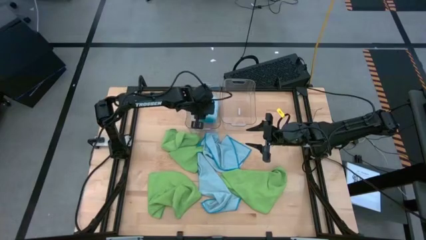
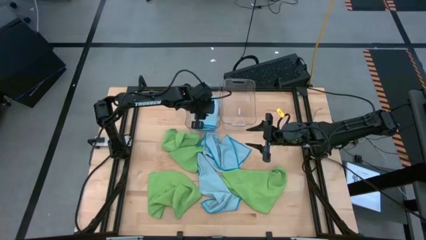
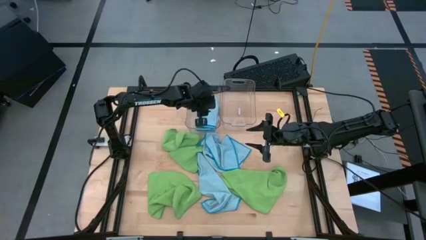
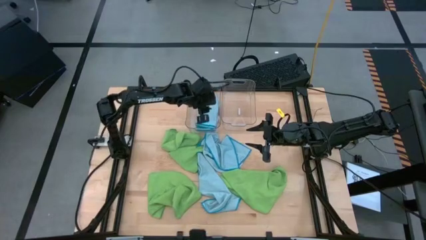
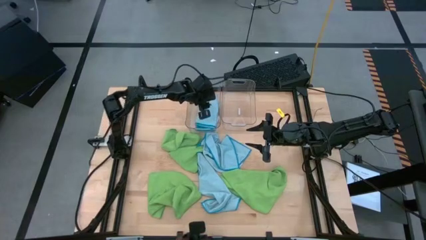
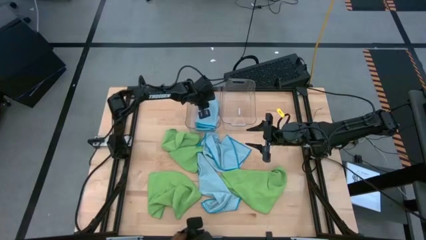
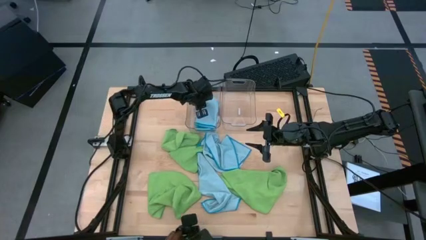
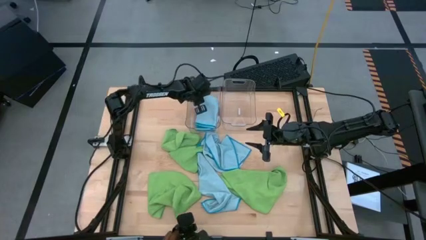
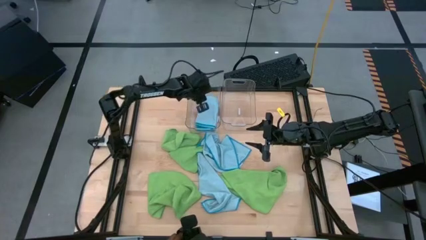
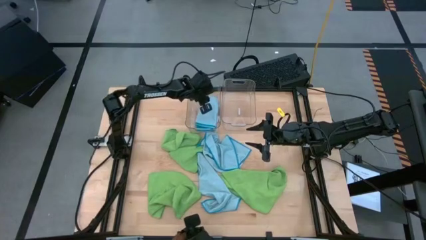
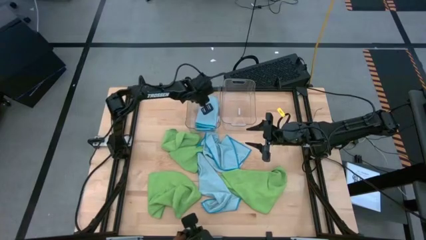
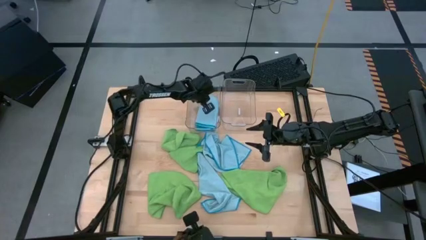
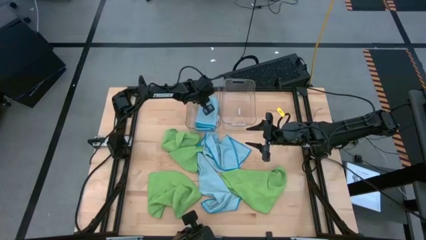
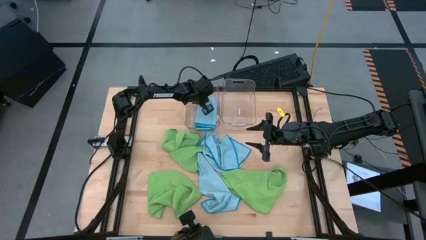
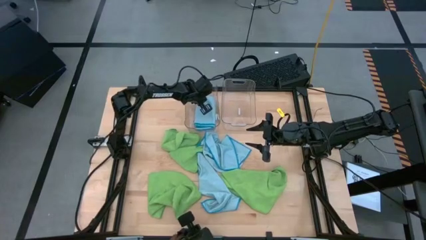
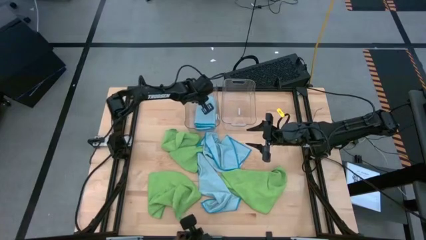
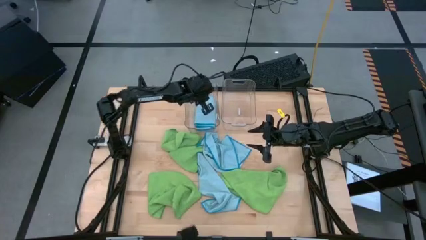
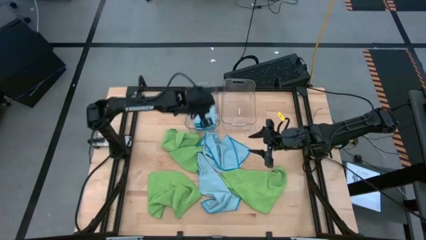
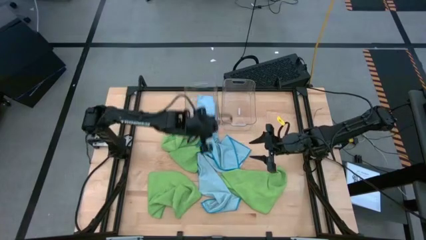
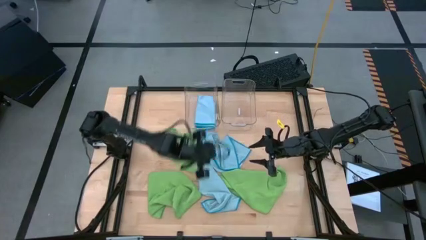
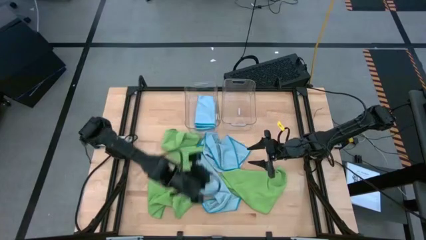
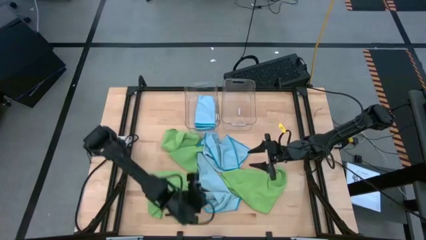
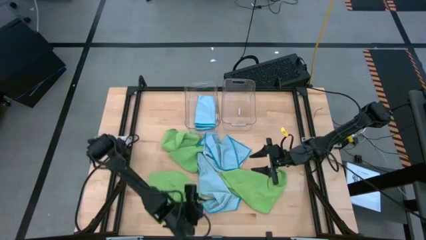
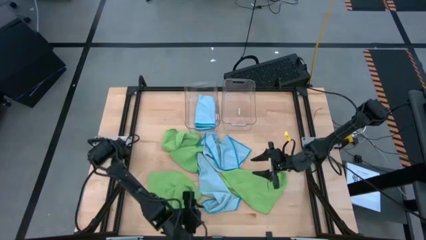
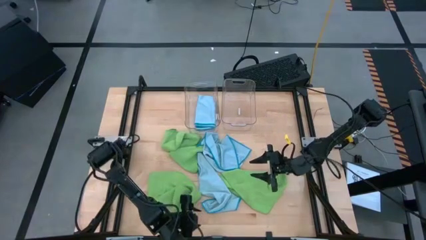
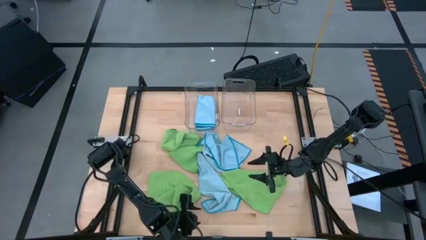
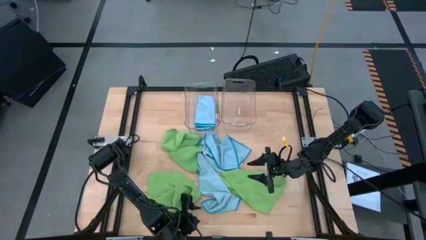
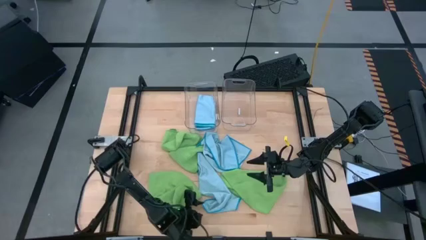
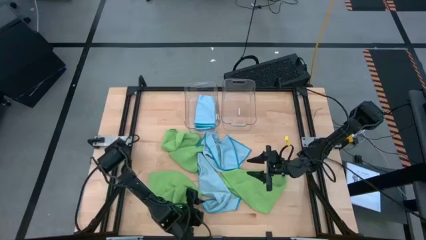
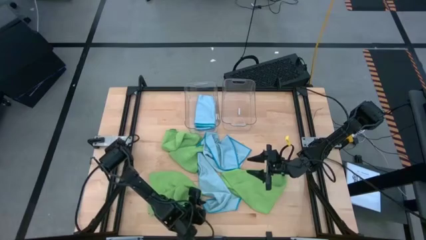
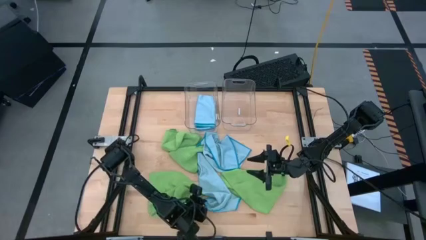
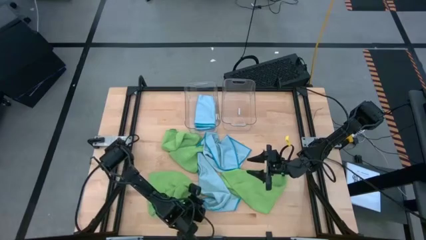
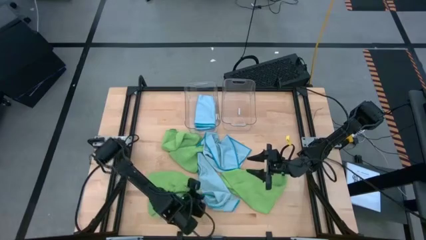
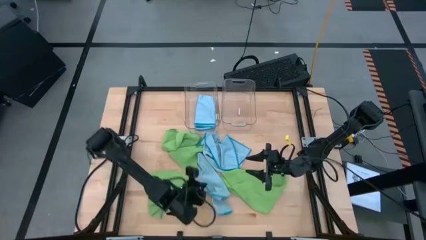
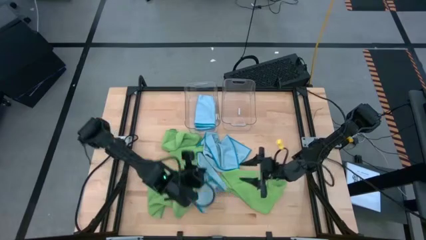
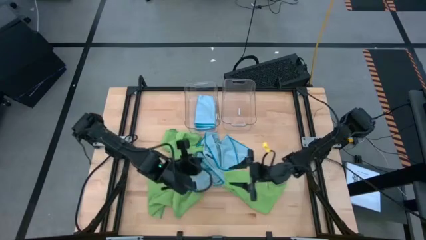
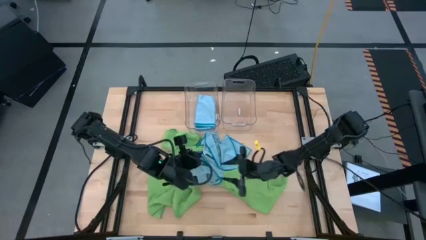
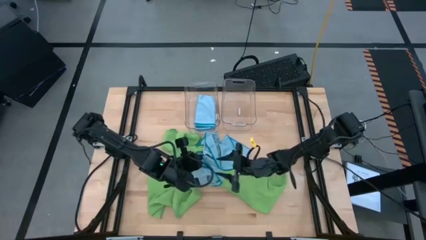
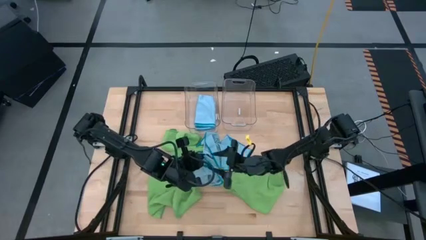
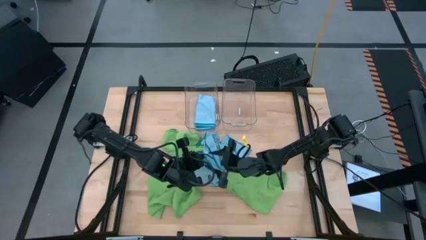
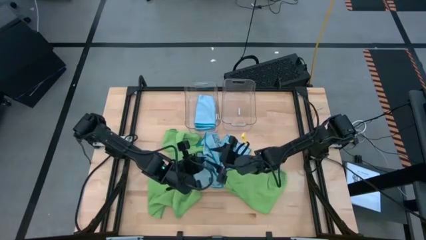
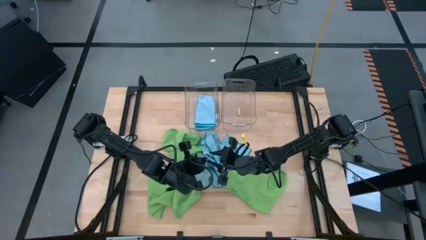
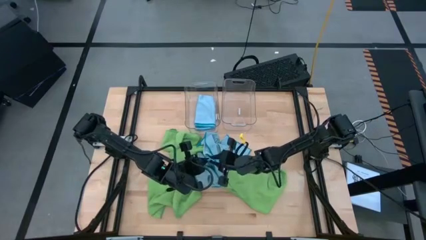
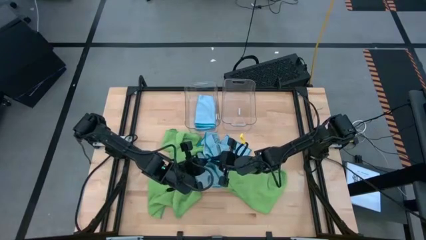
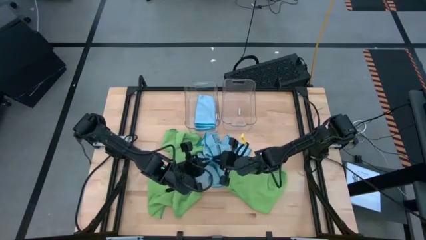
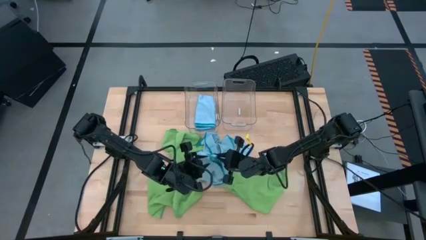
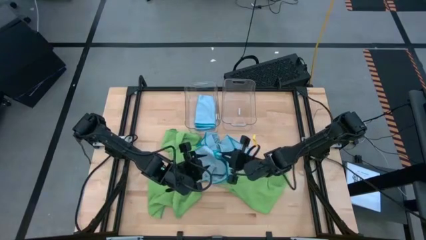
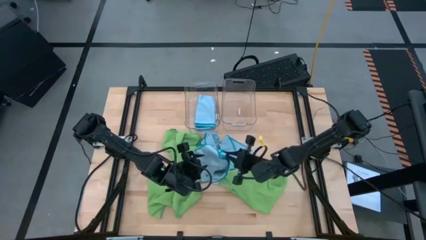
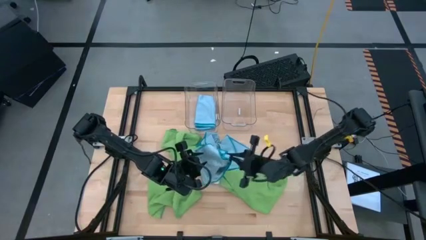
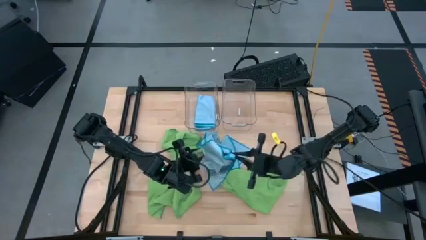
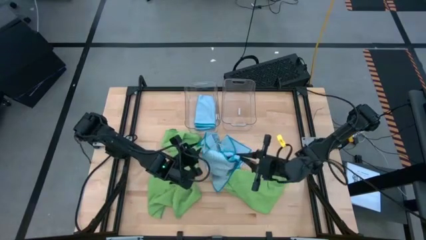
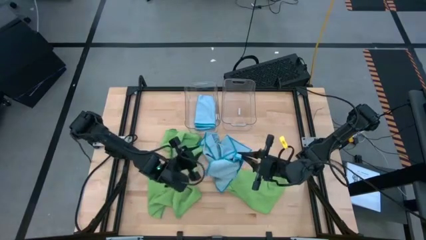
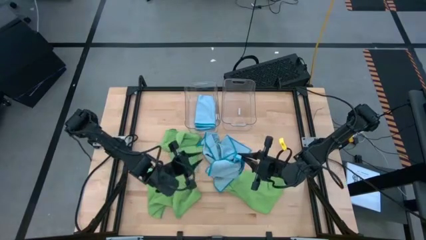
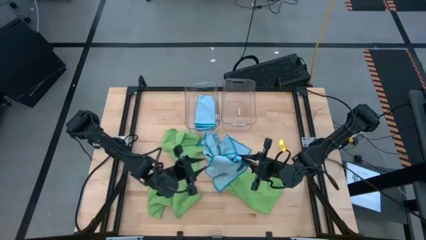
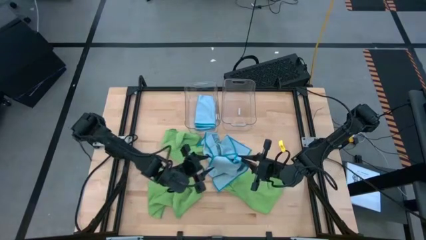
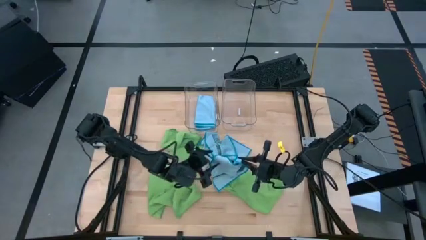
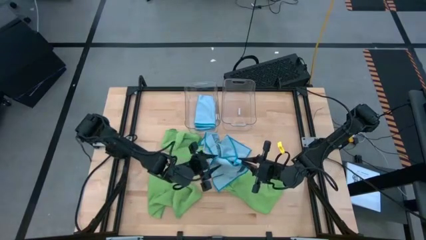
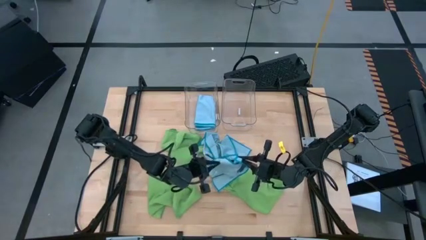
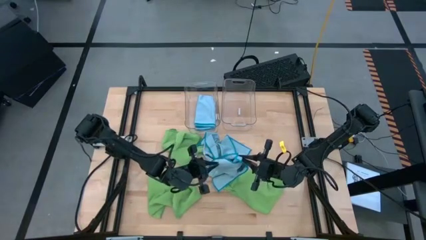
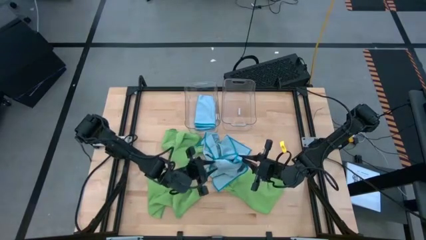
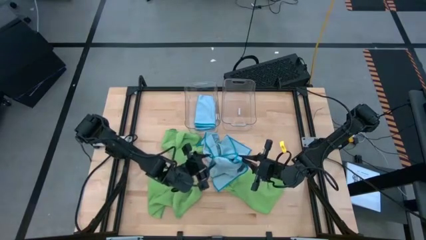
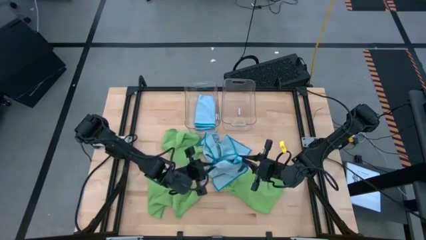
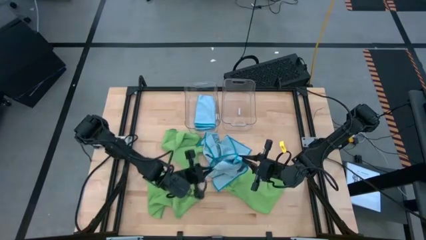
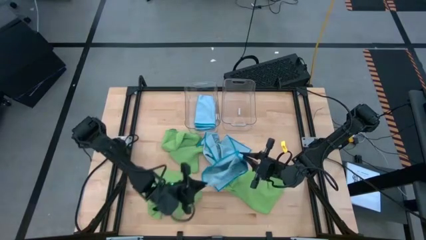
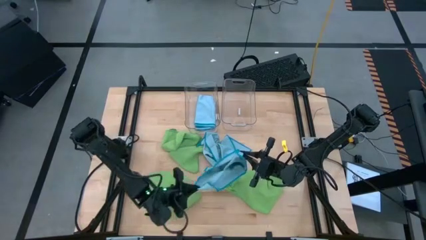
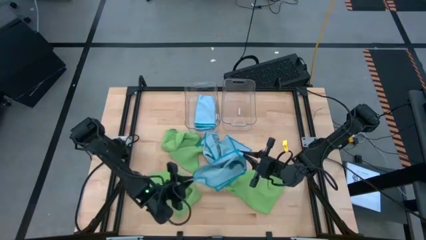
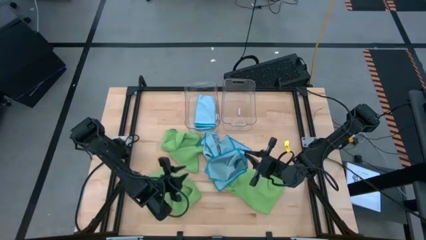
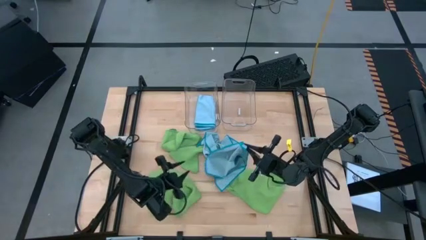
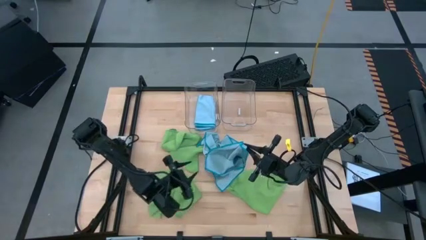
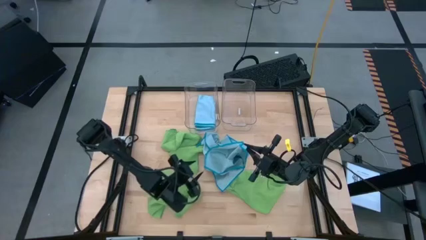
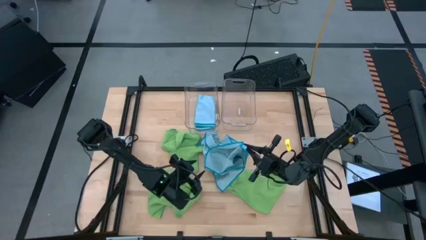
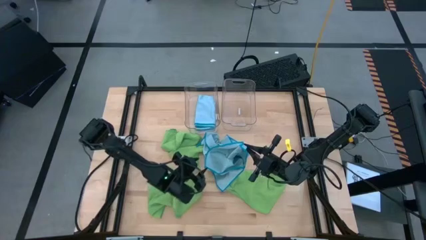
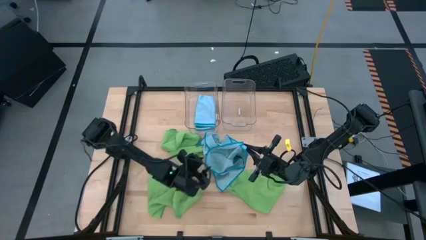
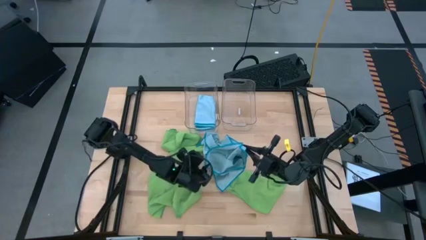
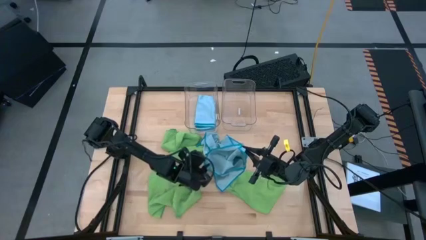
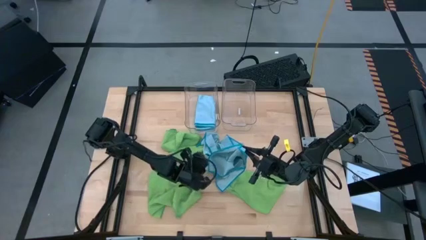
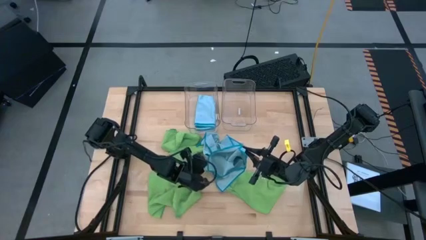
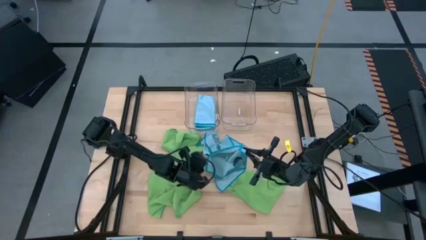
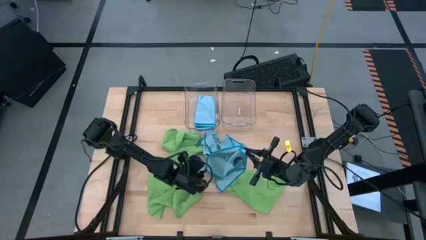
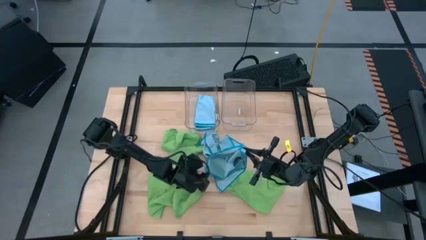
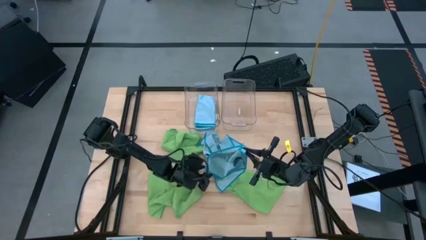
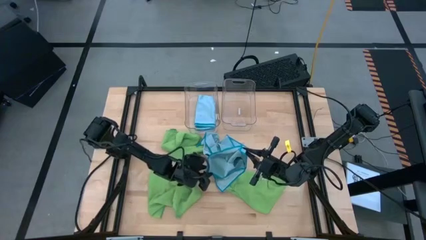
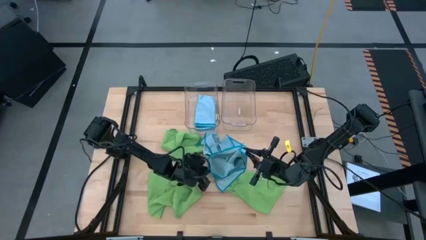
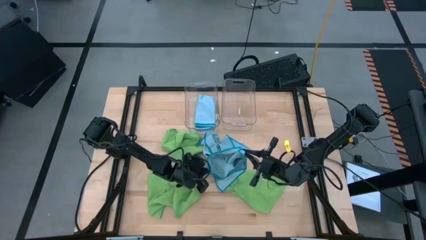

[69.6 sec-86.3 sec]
Task: Fold microfiber towels
Fold the bottom blue microfiber towel
